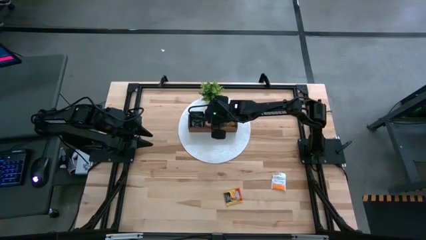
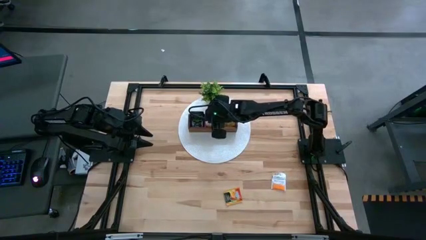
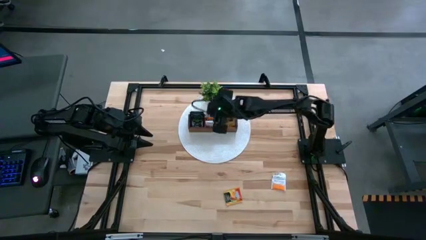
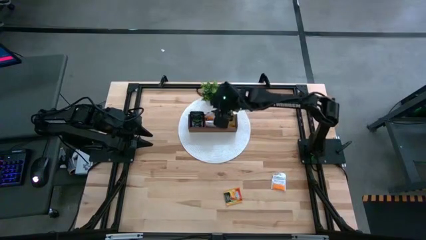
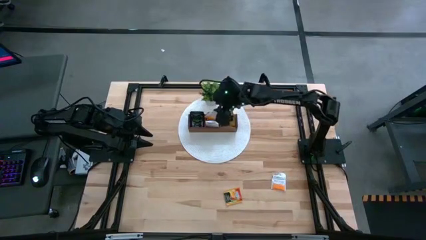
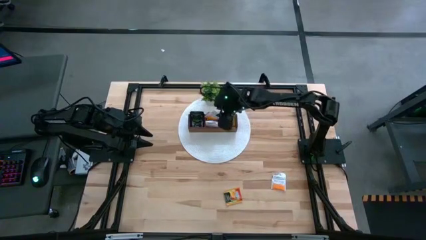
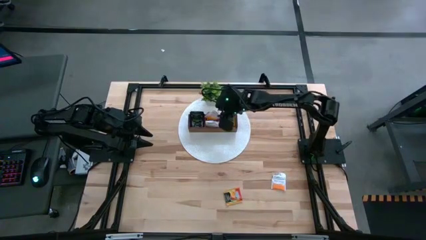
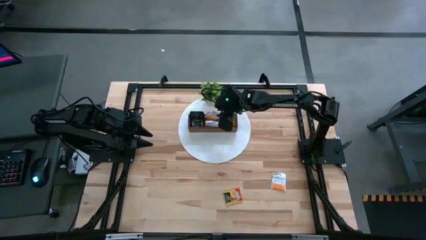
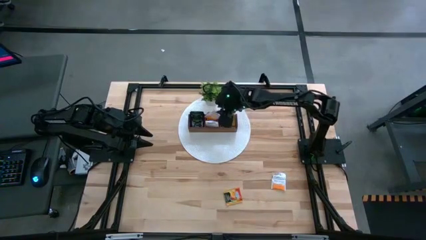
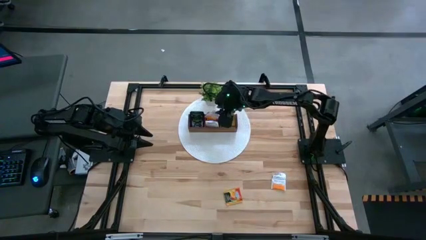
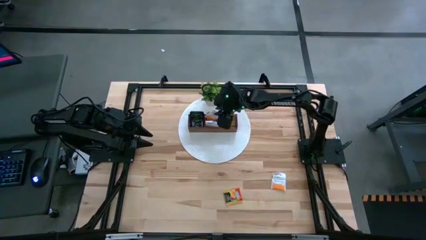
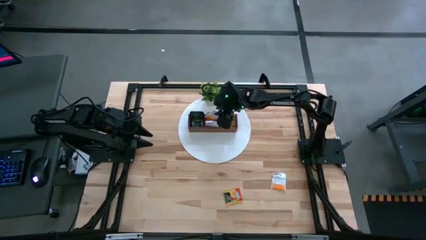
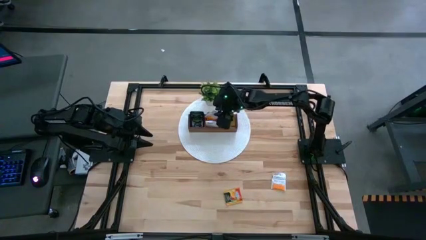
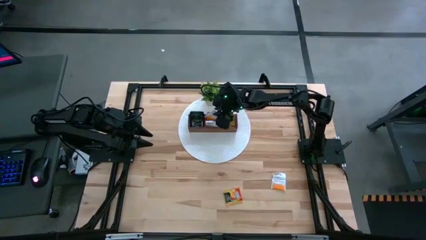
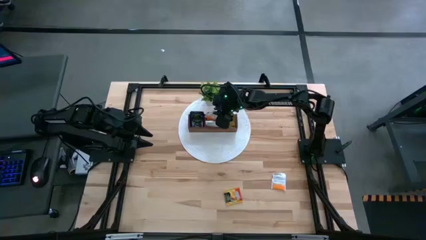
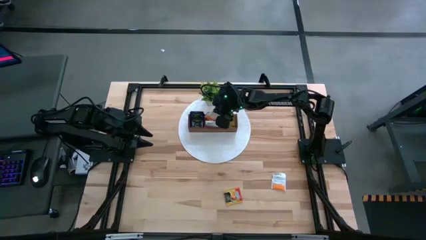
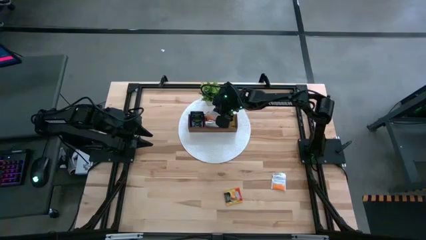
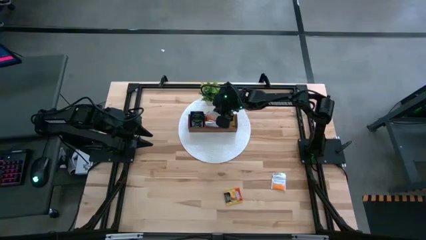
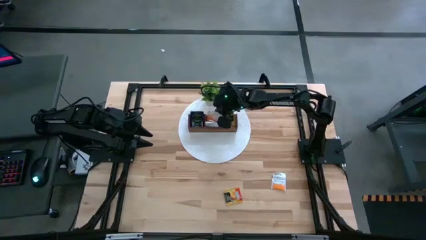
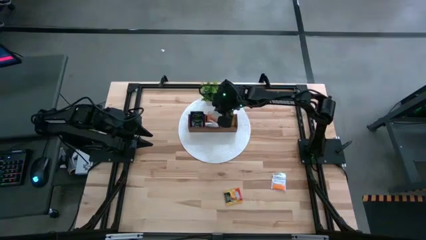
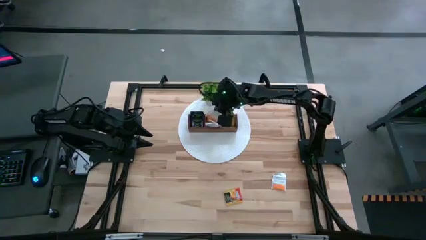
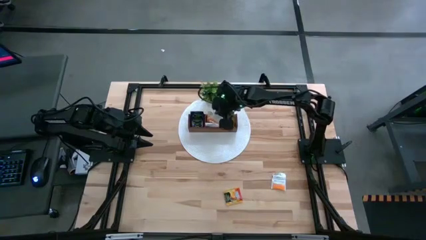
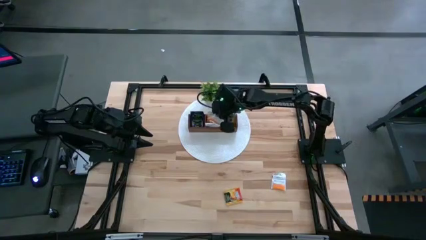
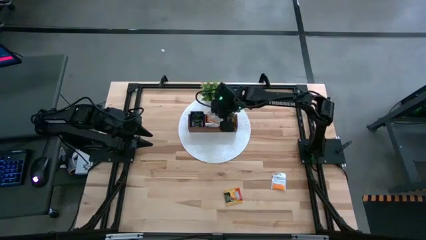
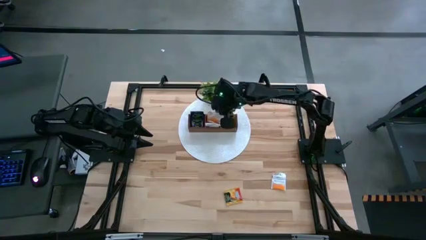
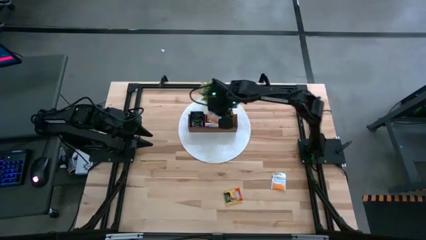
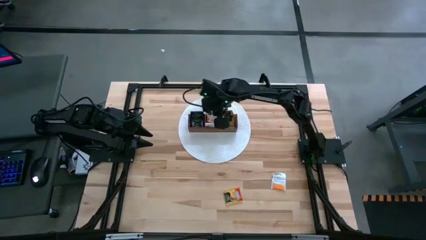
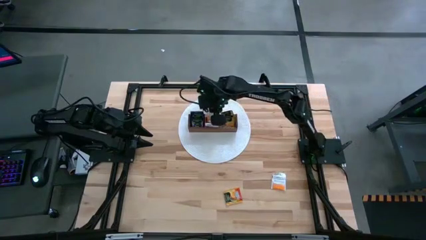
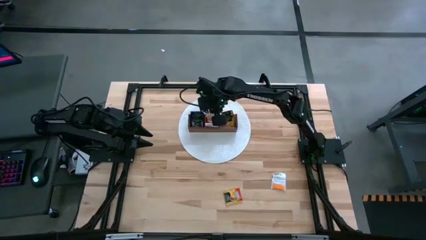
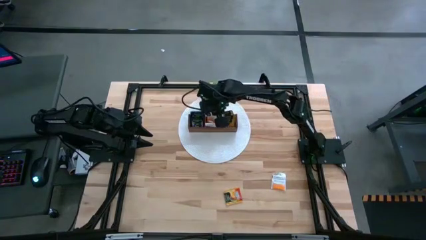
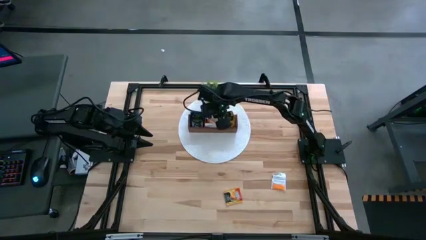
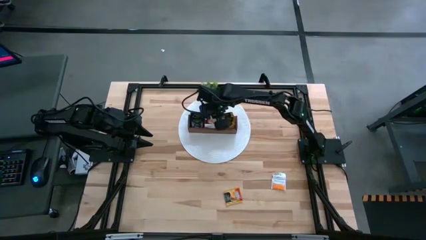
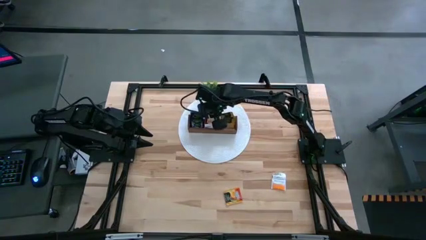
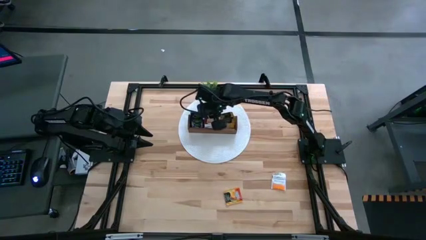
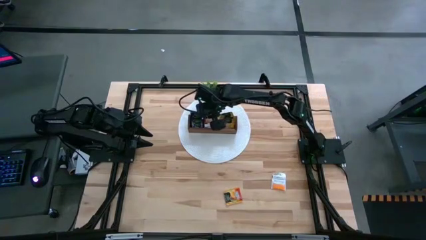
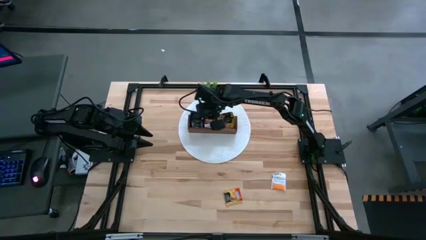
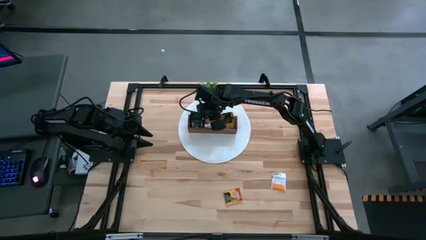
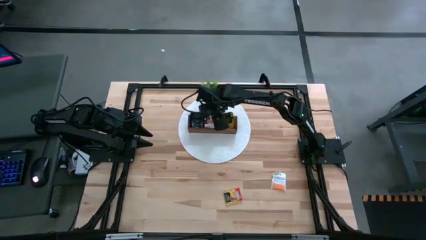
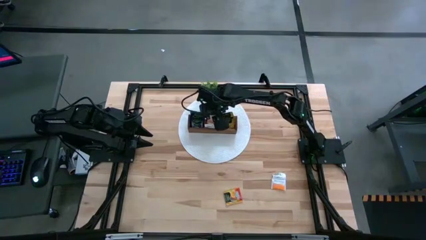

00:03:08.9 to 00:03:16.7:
Task: Pick & Place Tea
Adjust the other white orange tea bag

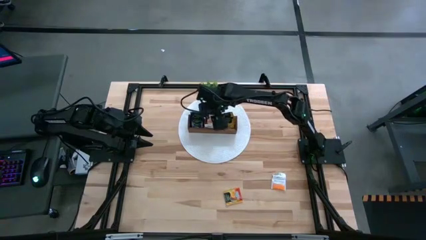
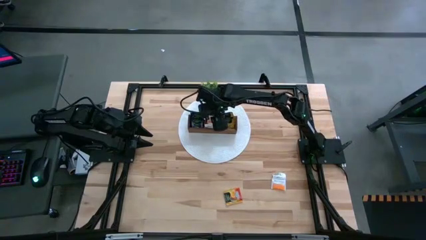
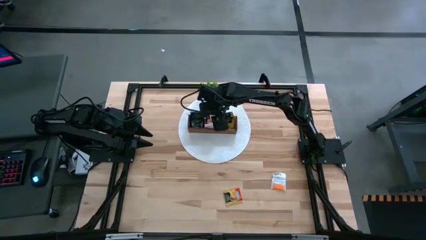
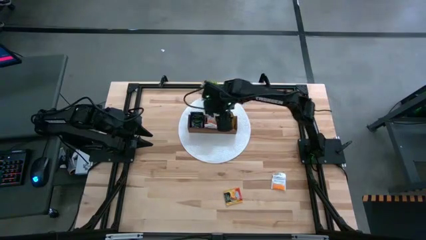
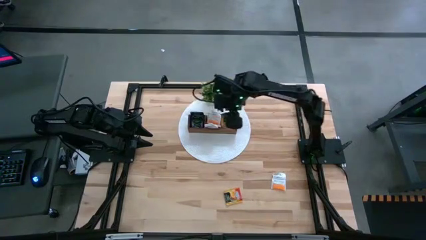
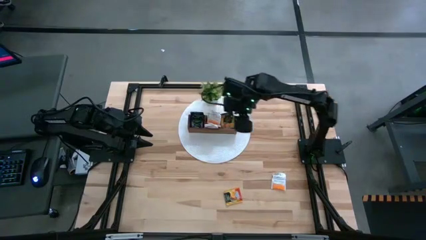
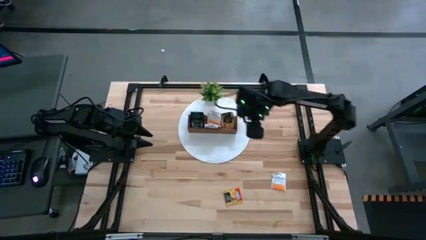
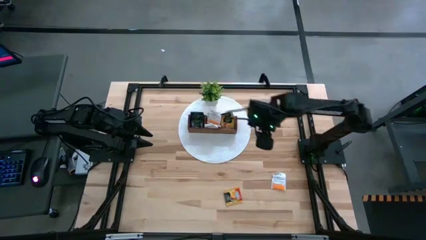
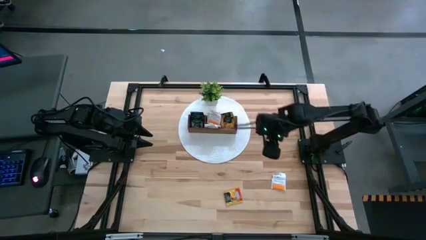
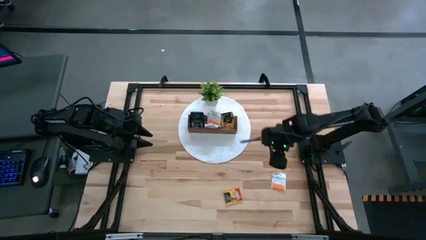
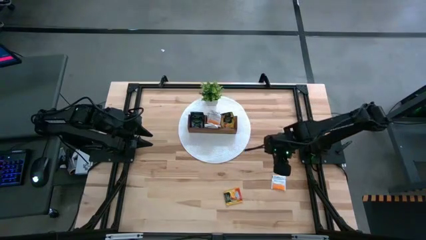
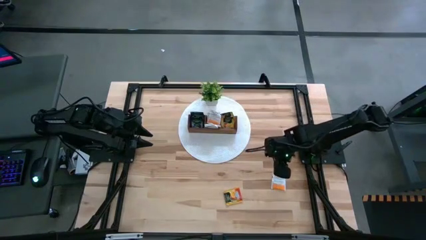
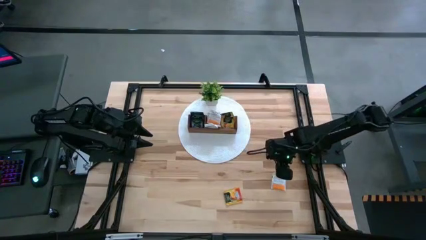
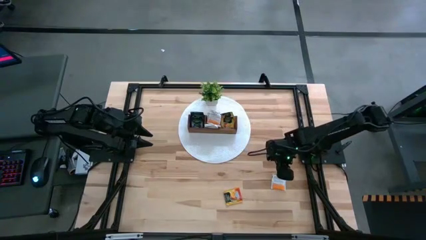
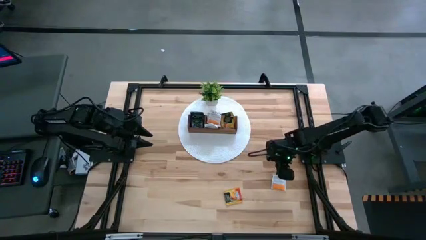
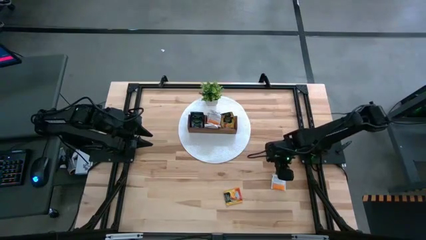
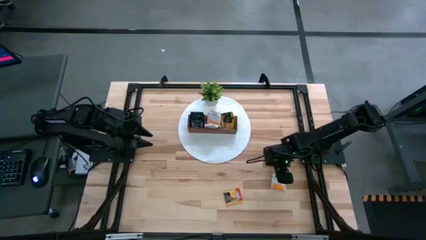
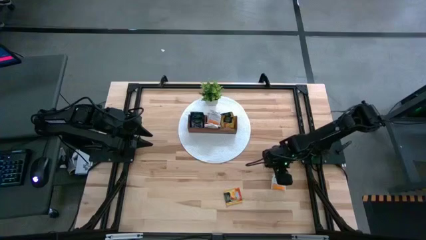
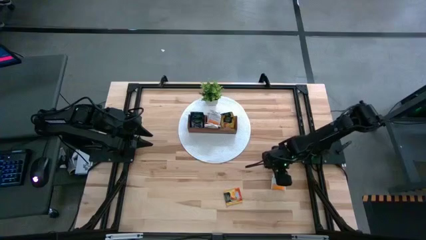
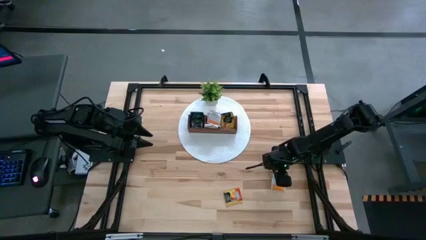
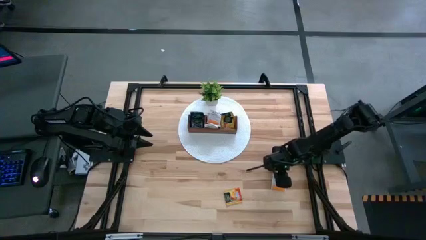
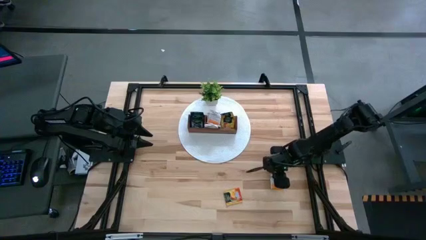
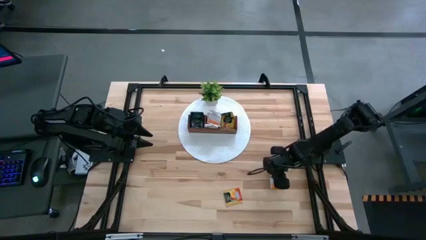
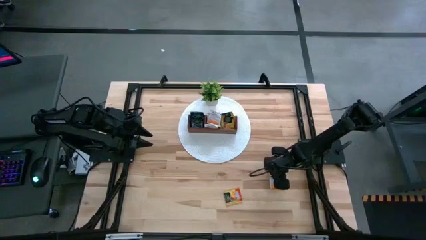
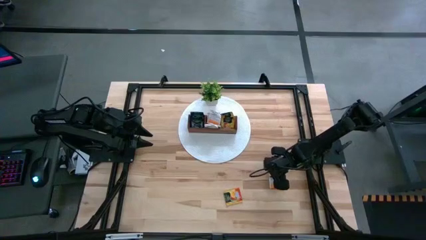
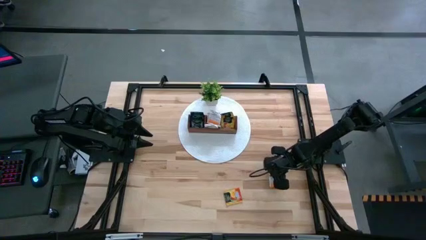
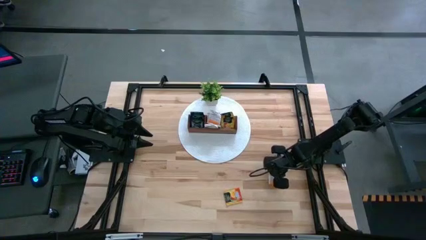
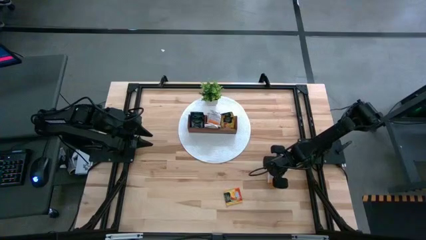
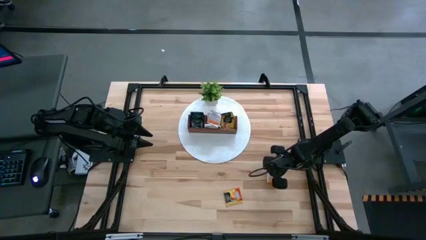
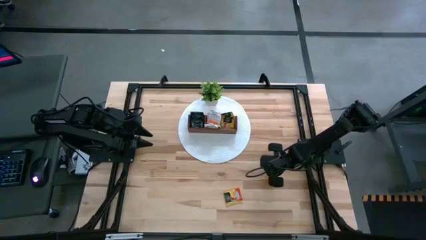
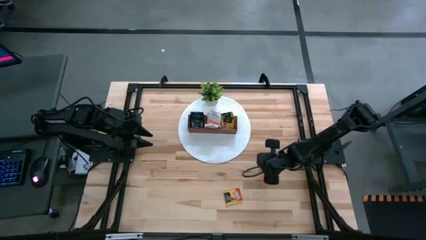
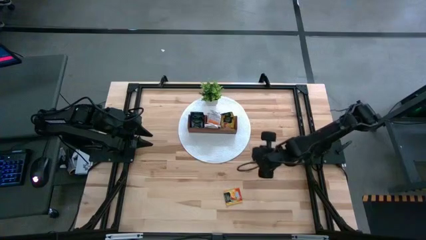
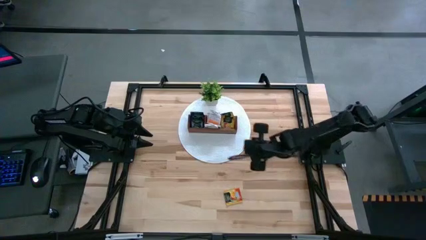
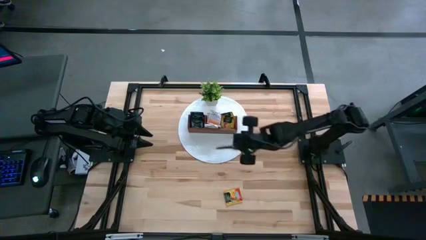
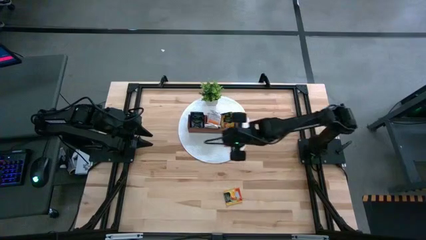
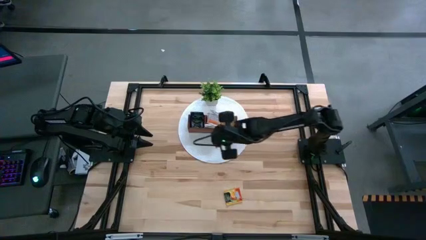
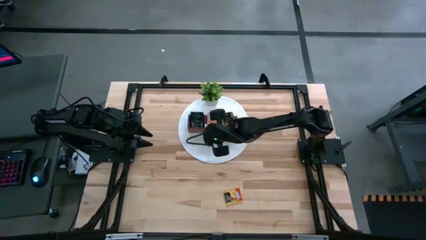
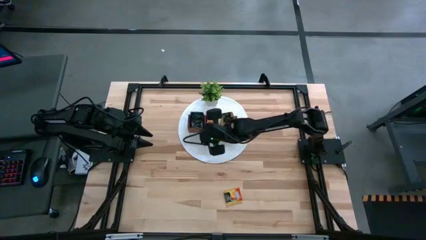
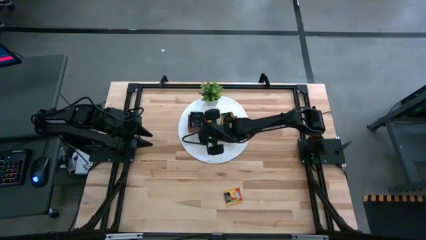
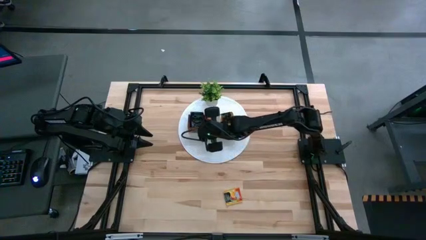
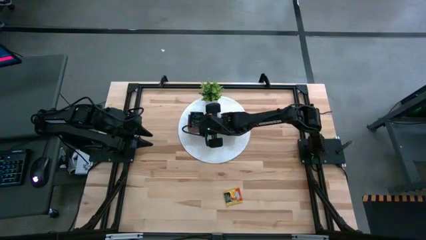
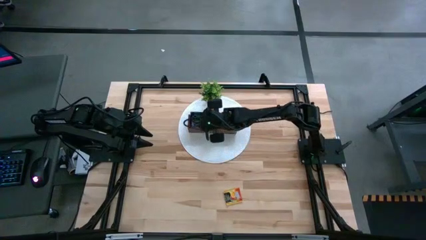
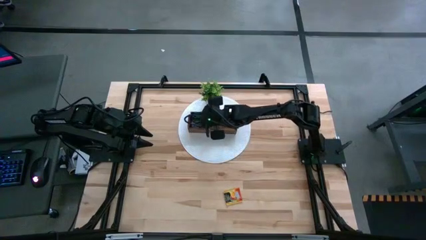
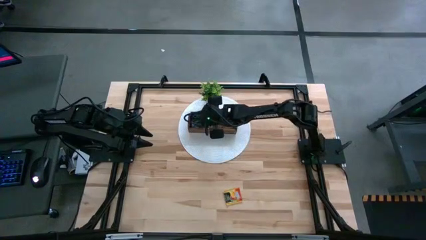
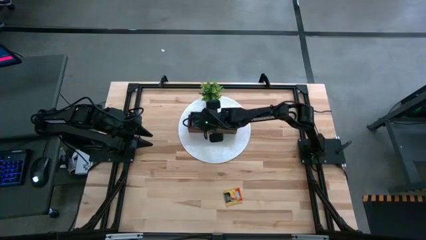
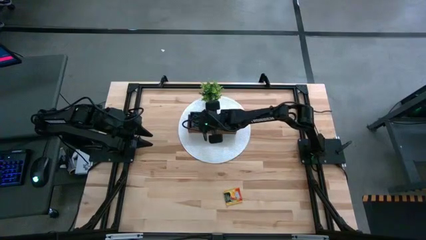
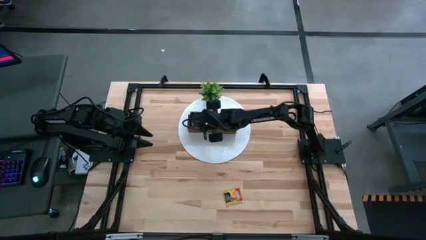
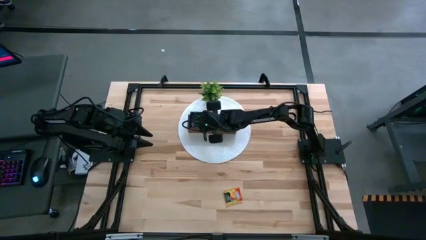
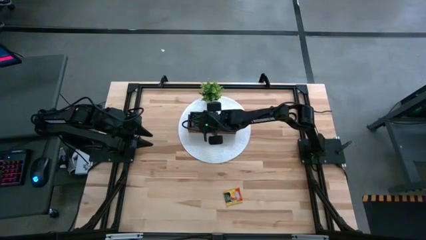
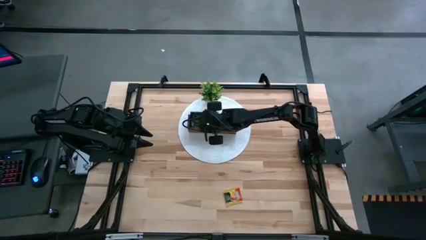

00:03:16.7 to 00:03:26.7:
Put the white orange tea bag into the middle section of the wooden organizer
